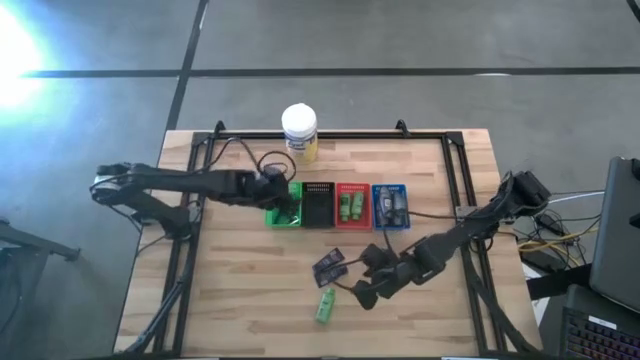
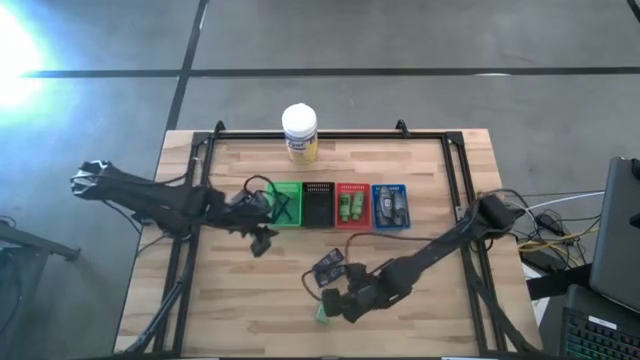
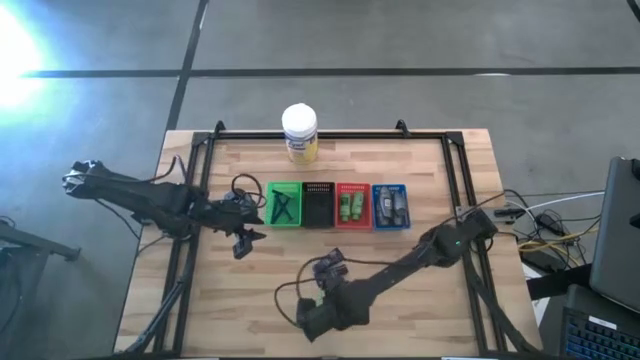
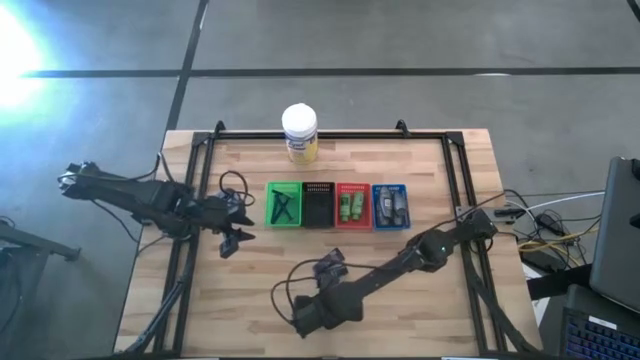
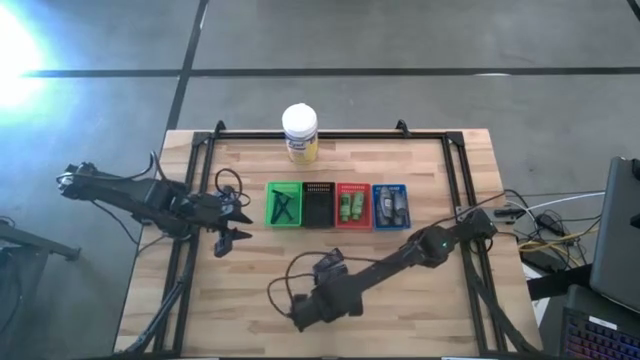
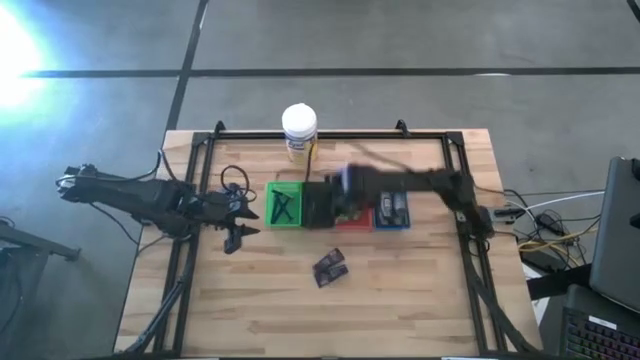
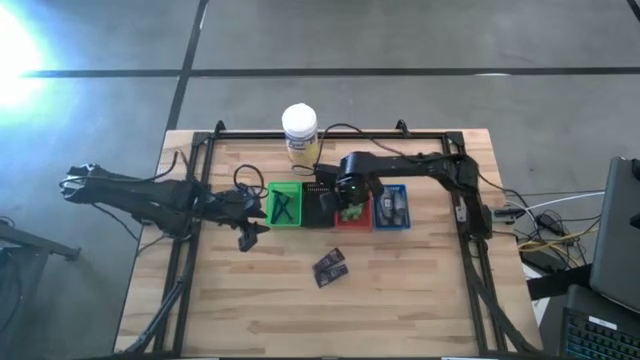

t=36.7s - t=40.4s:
Task: Pick & Place Travel size toiletries
Put the green shampoo into the red bin

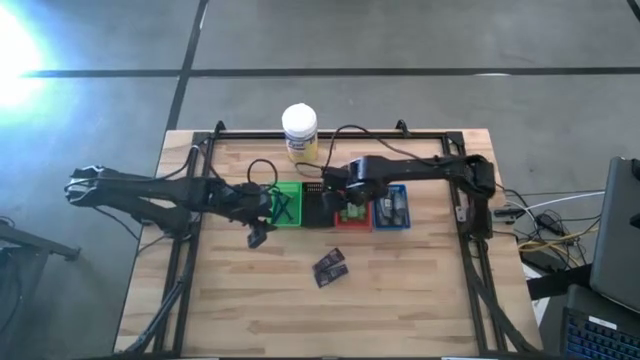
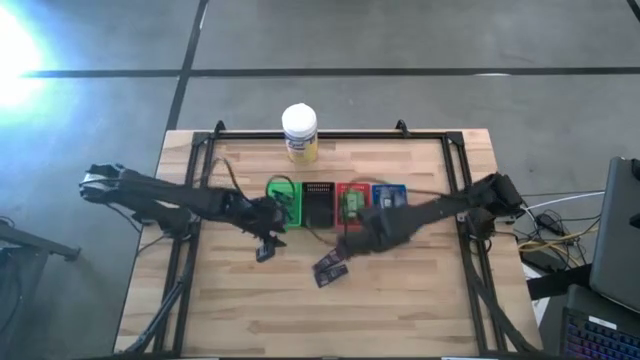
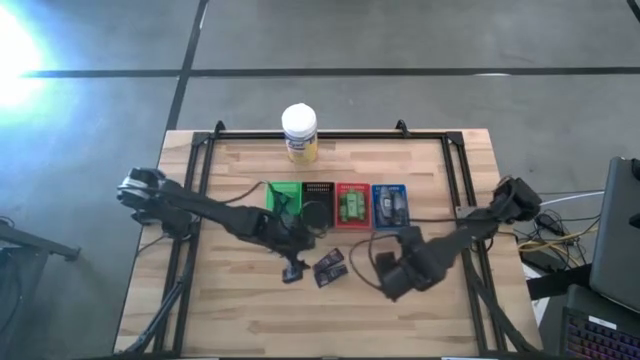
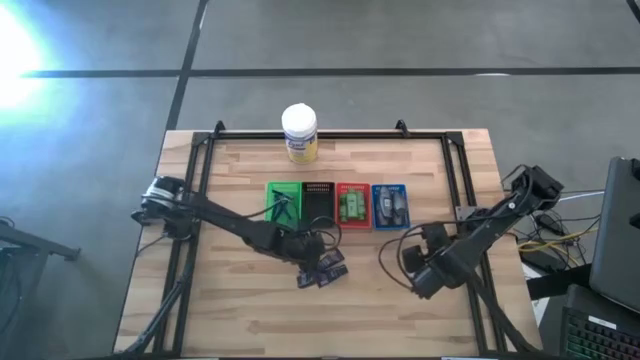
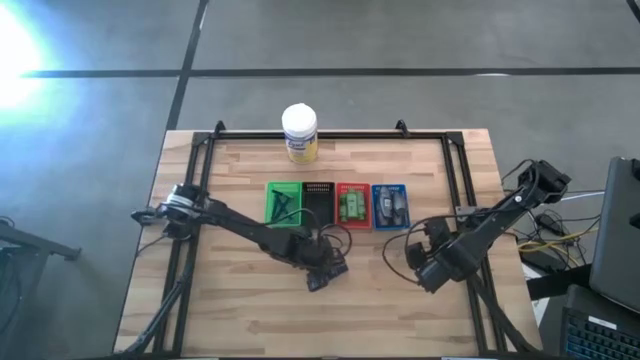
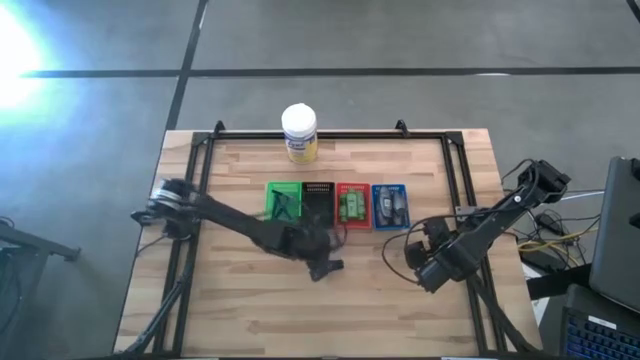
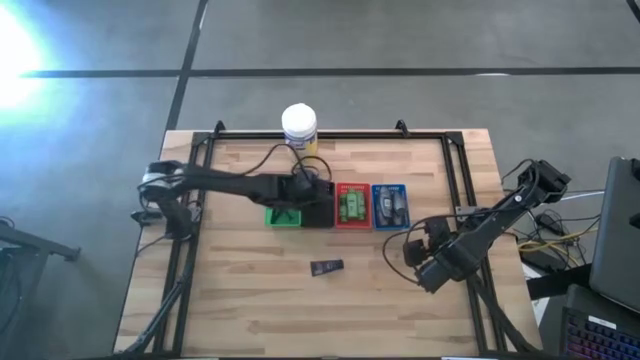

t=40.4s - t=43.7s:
Put the blue shave cream into the black bin

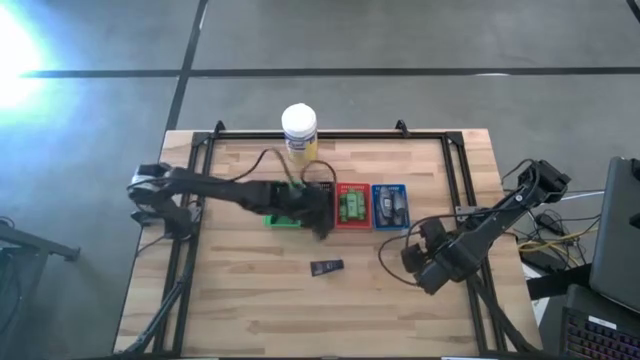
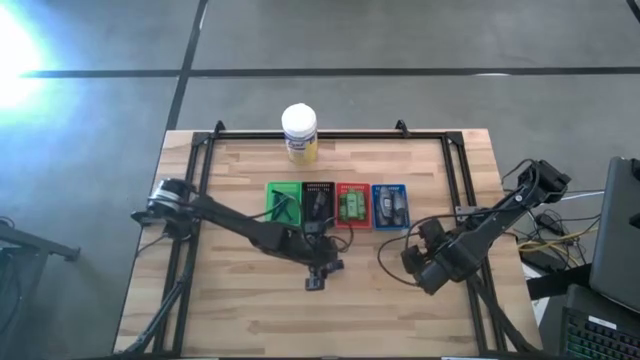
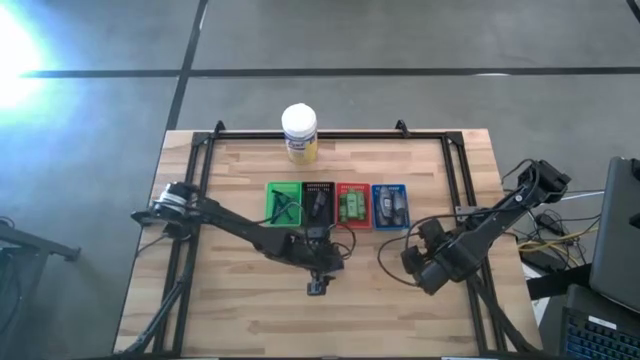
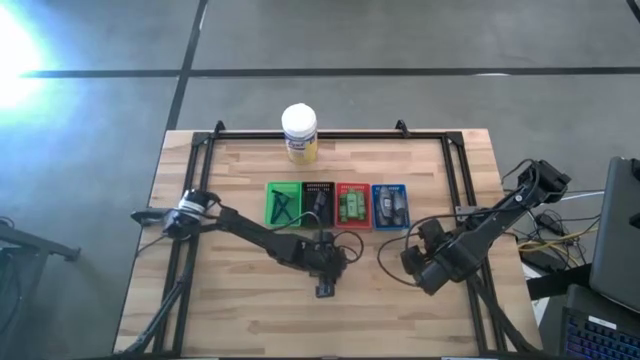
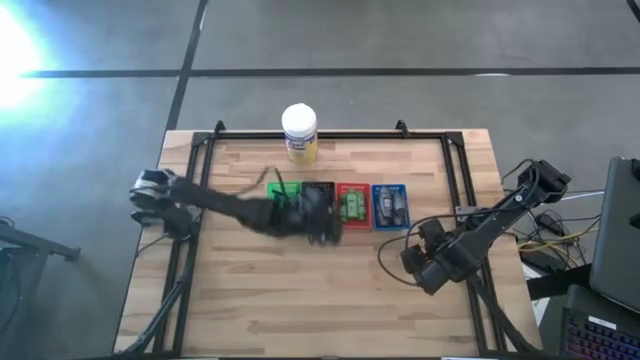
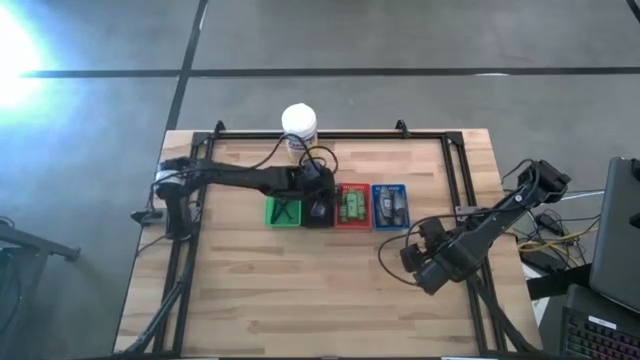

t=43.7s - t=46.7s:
Put the blue shave cream into the black bin

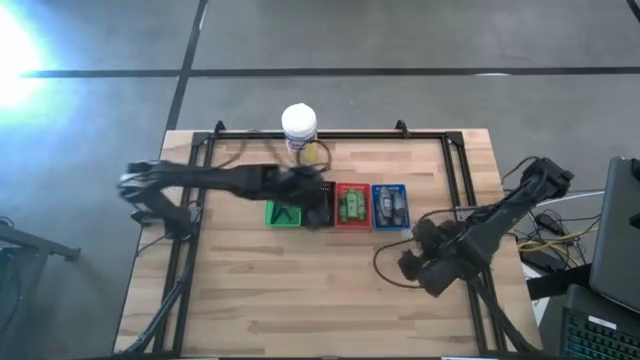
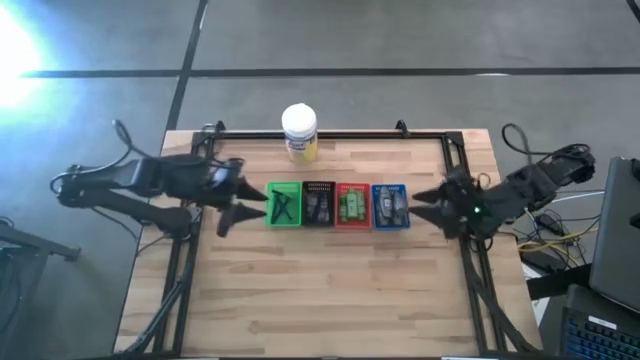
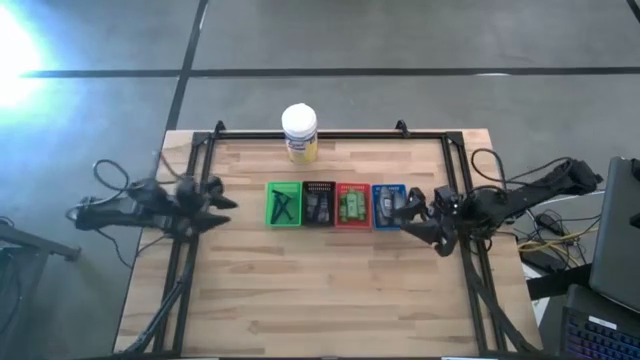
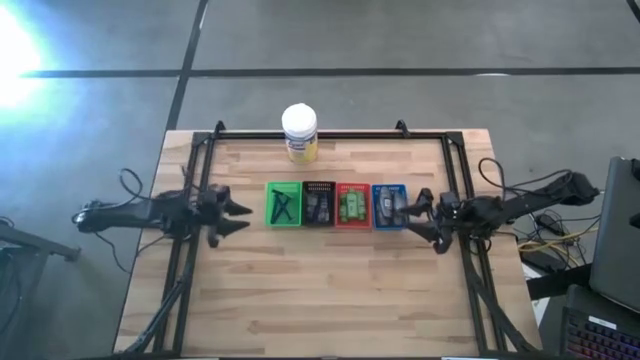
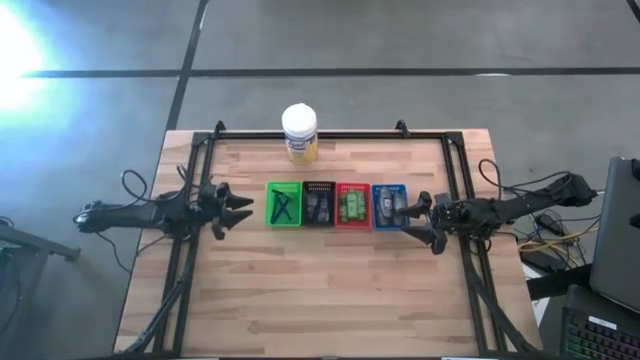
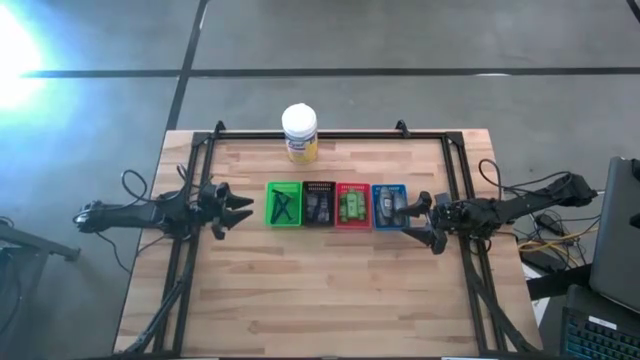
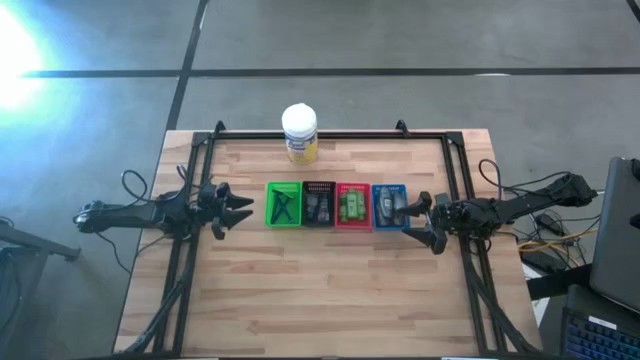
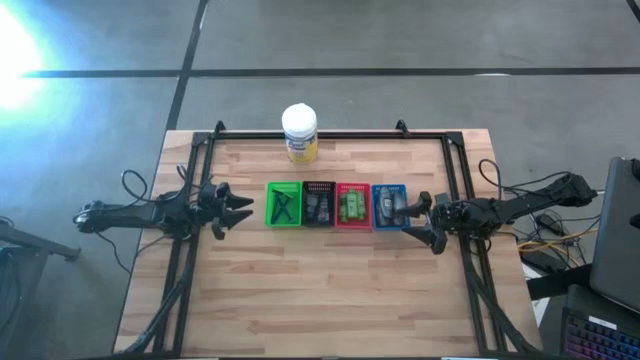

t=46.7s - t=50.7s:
Return to Home Position

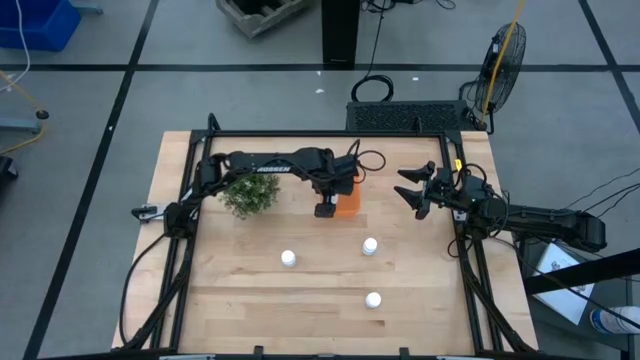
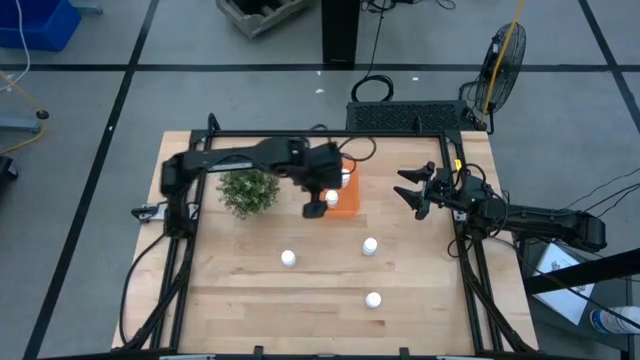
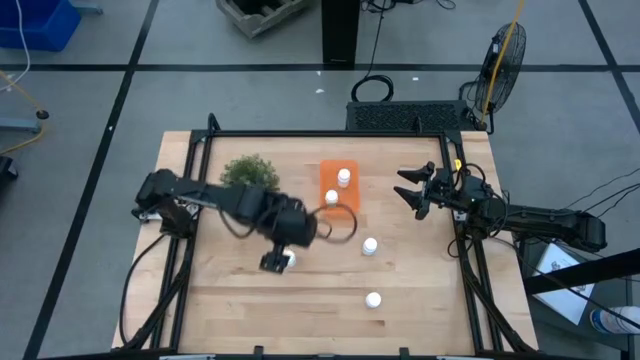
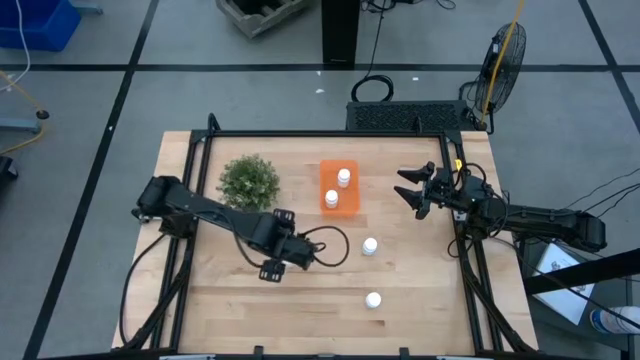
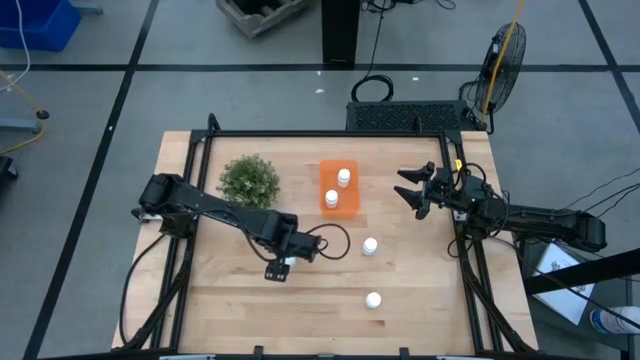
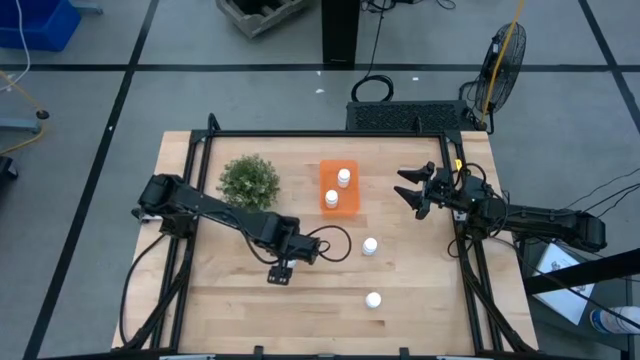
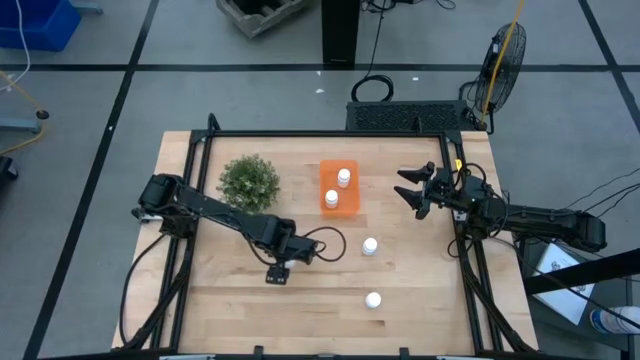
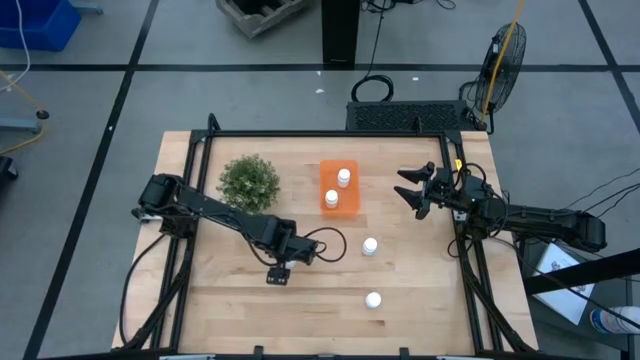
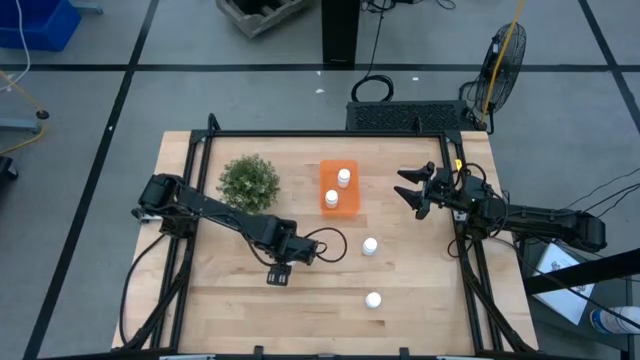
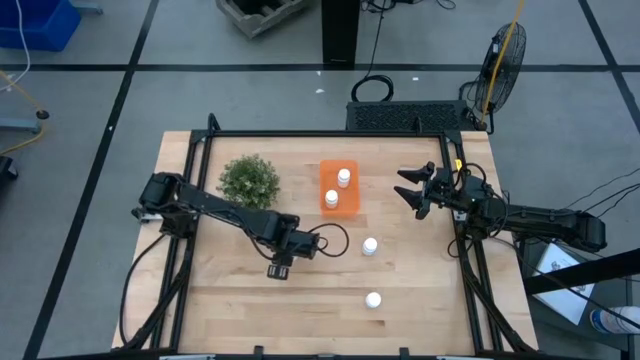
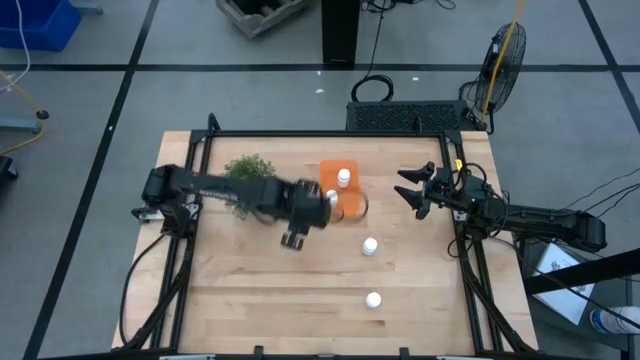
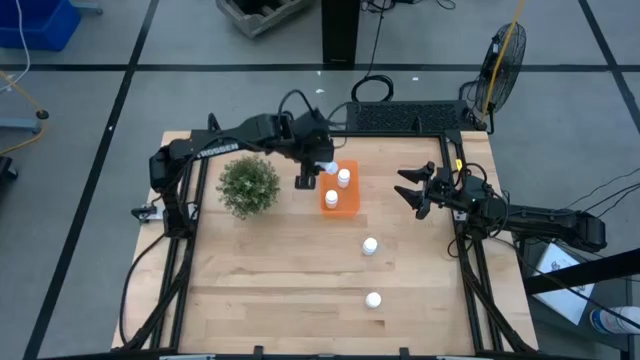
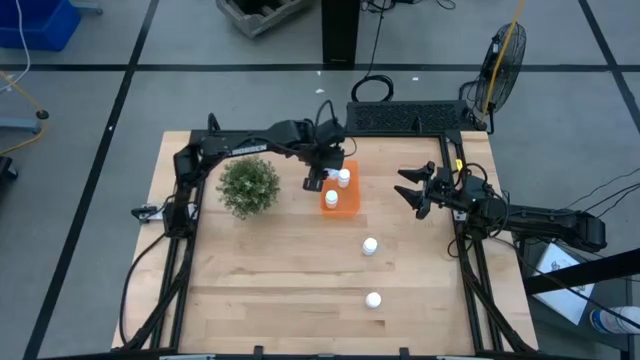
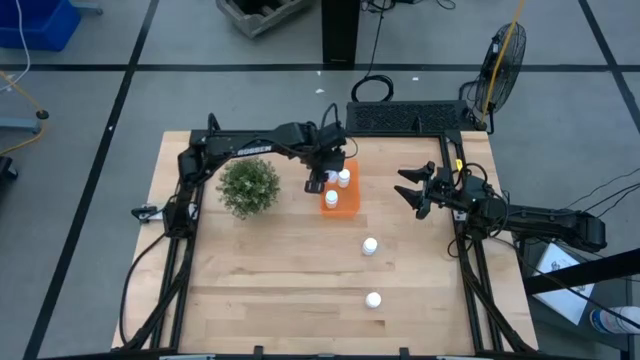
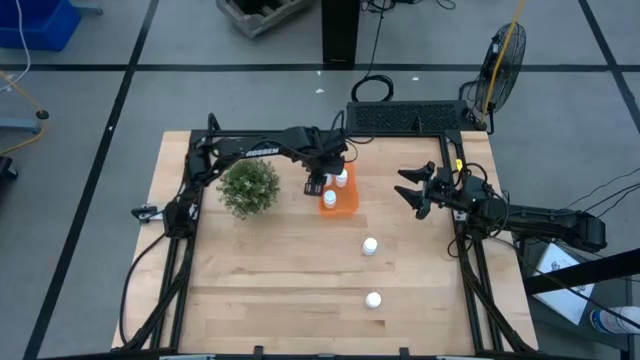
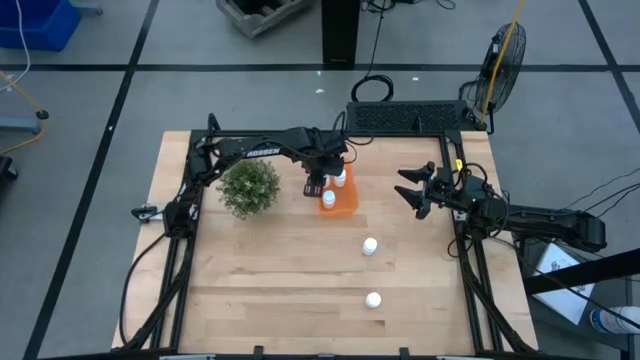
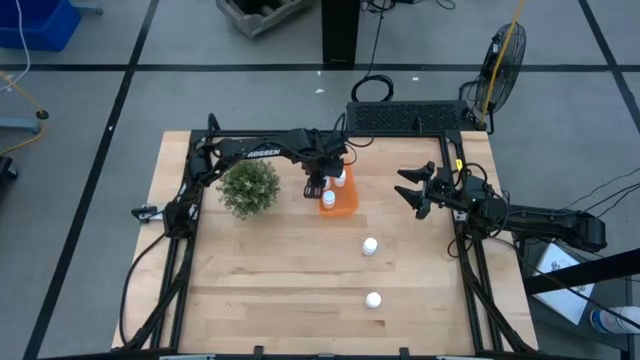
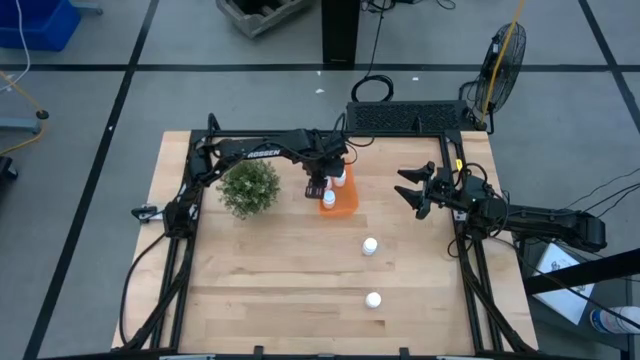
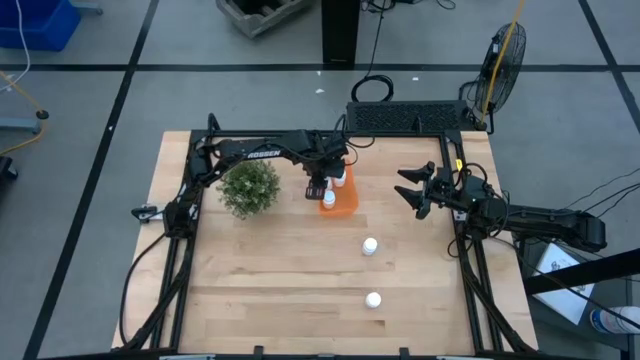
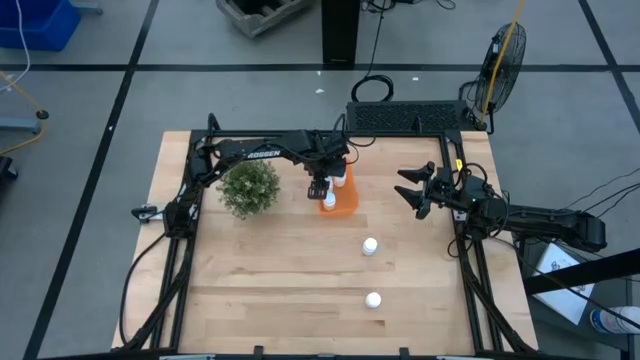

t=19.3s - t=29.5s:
Task: Pick and place pill bottles into a basket
Put the white pill bottle into the orange bin
